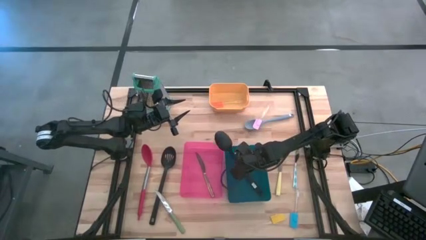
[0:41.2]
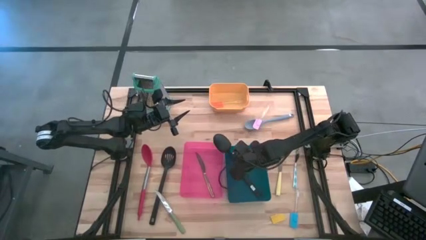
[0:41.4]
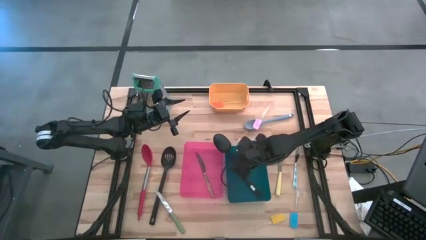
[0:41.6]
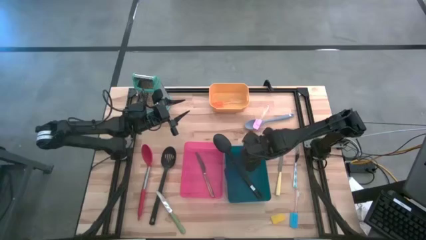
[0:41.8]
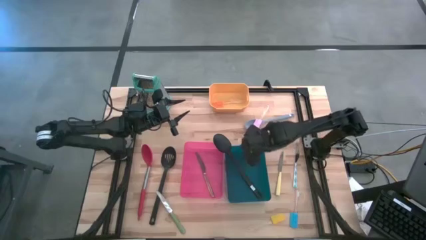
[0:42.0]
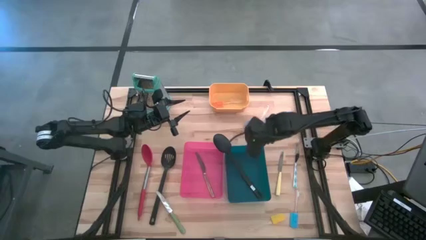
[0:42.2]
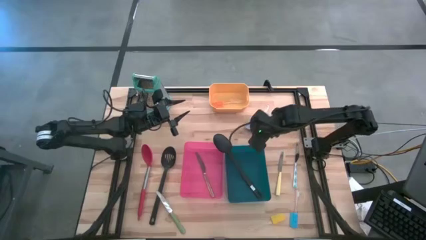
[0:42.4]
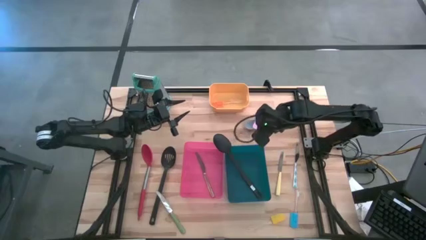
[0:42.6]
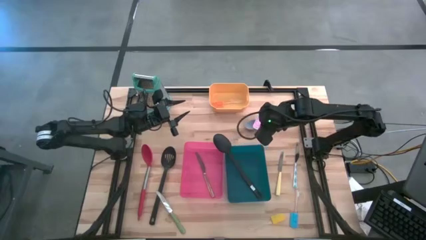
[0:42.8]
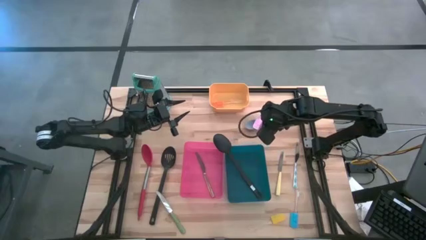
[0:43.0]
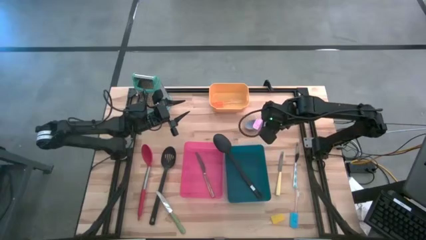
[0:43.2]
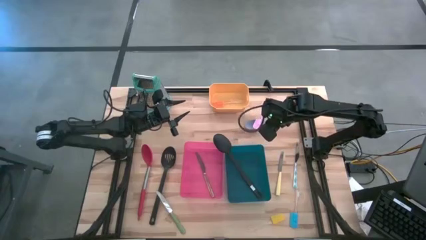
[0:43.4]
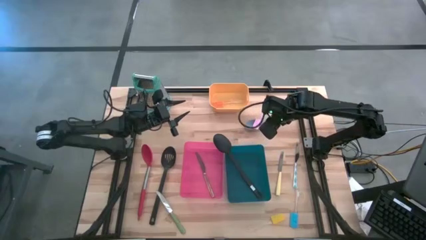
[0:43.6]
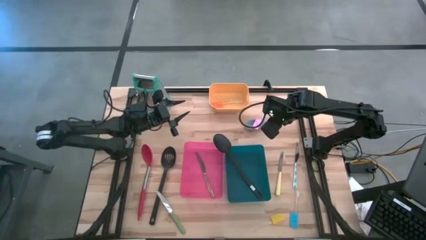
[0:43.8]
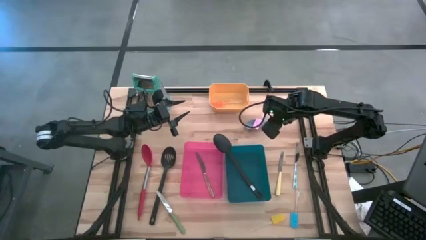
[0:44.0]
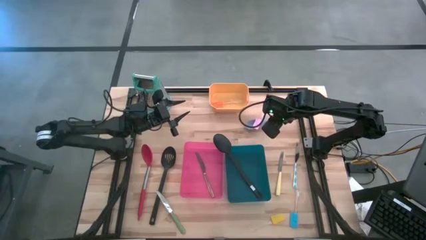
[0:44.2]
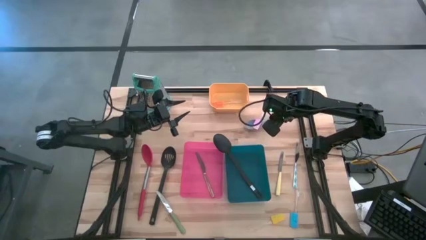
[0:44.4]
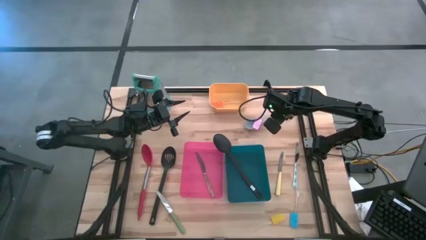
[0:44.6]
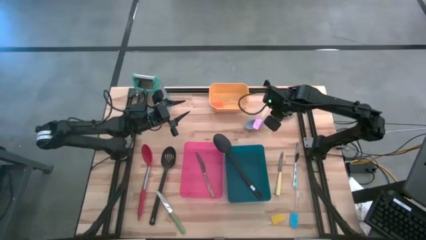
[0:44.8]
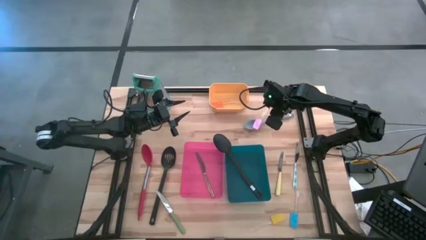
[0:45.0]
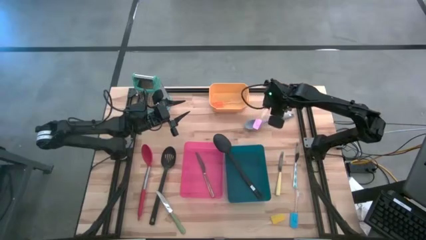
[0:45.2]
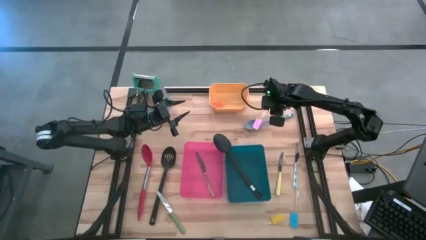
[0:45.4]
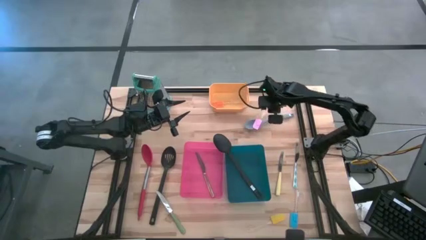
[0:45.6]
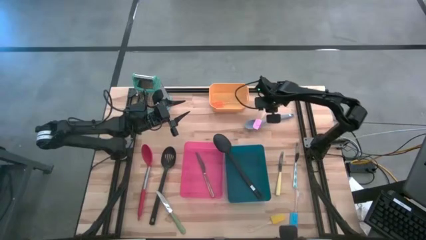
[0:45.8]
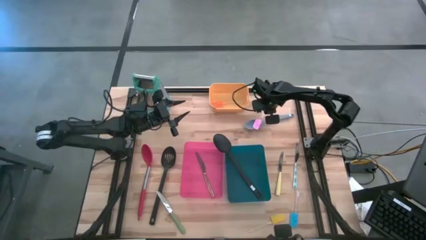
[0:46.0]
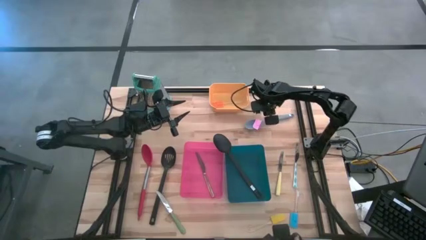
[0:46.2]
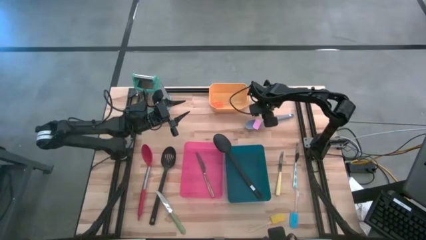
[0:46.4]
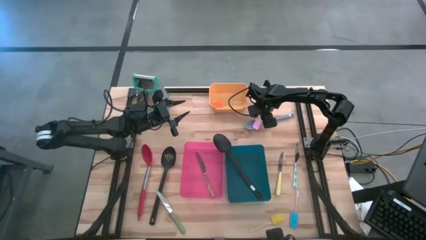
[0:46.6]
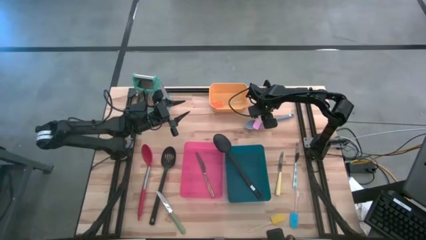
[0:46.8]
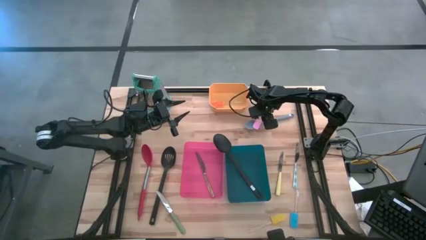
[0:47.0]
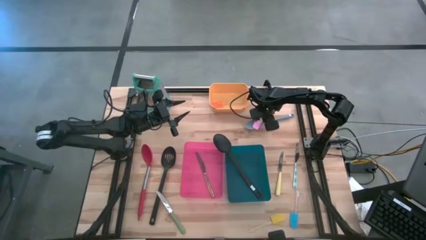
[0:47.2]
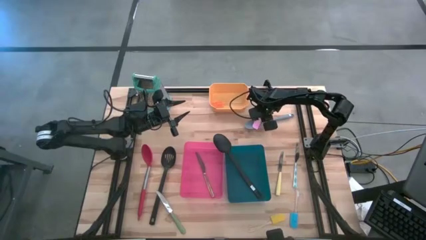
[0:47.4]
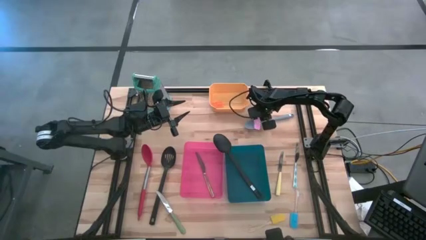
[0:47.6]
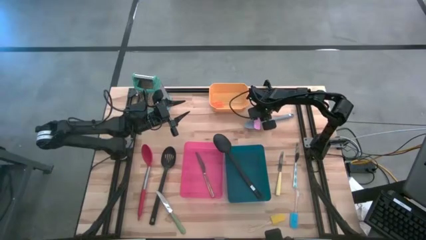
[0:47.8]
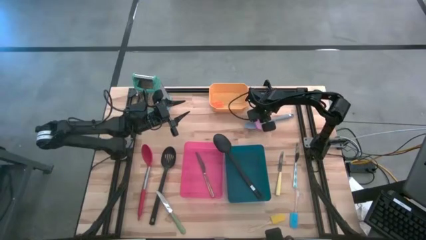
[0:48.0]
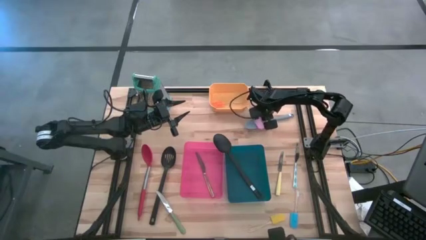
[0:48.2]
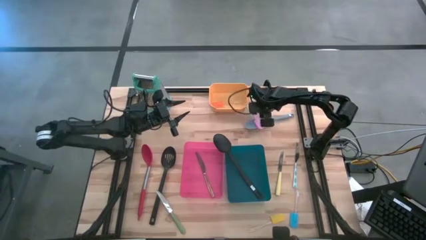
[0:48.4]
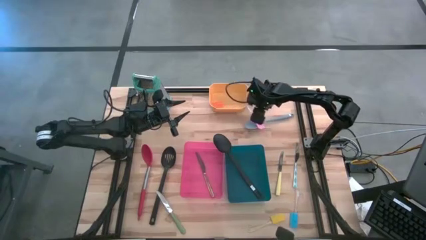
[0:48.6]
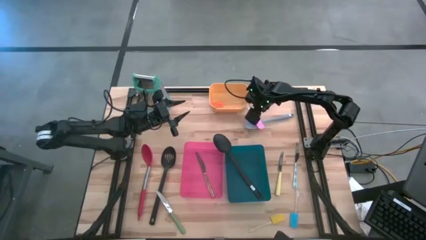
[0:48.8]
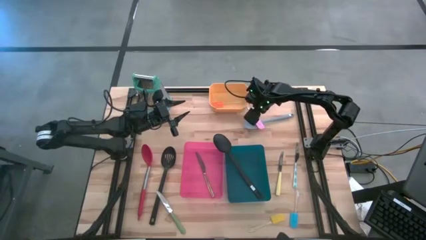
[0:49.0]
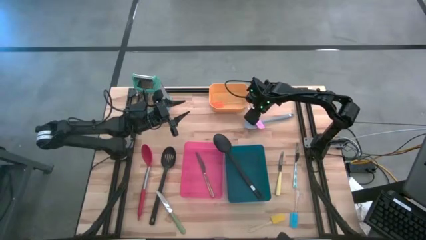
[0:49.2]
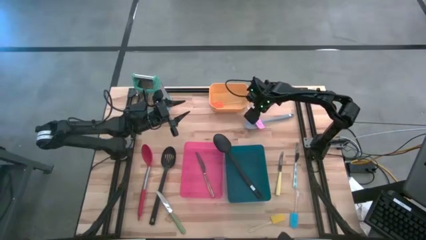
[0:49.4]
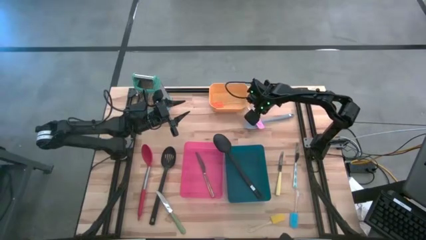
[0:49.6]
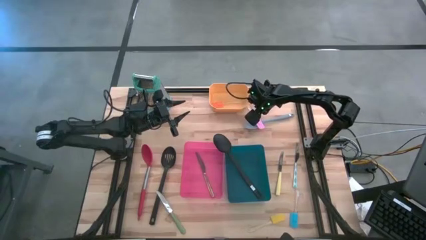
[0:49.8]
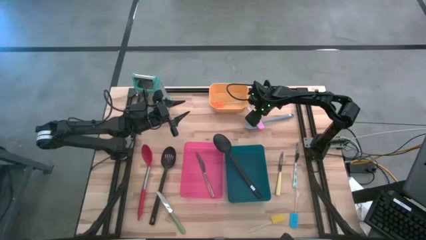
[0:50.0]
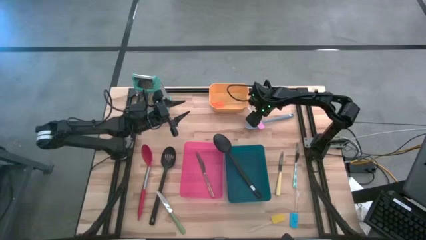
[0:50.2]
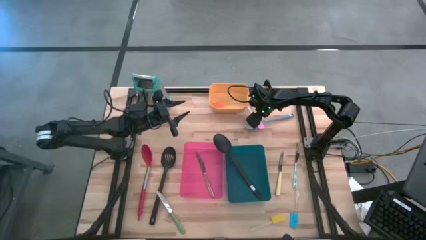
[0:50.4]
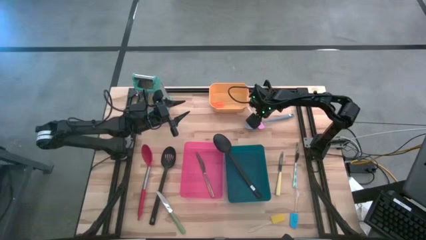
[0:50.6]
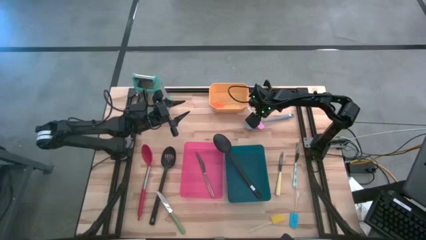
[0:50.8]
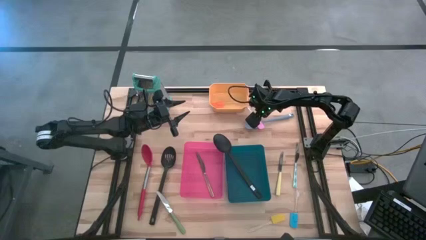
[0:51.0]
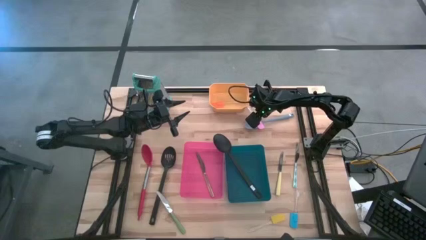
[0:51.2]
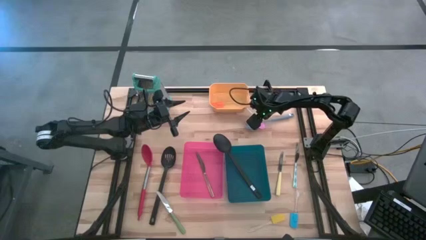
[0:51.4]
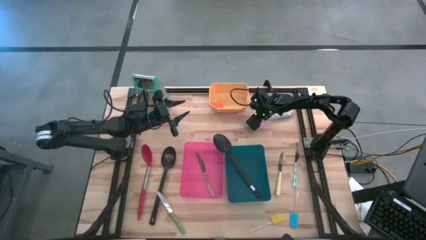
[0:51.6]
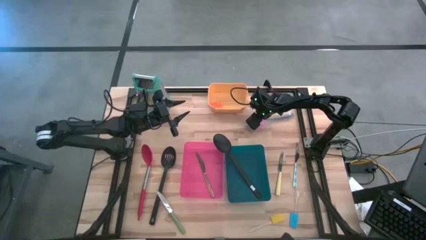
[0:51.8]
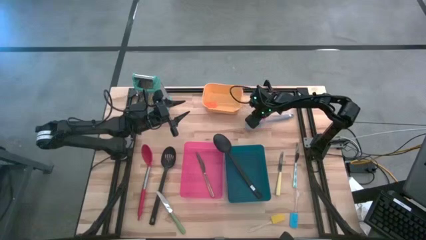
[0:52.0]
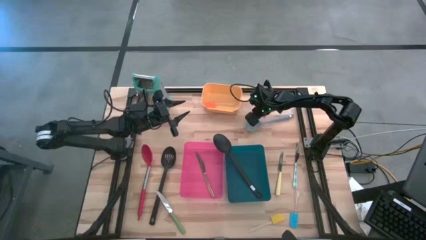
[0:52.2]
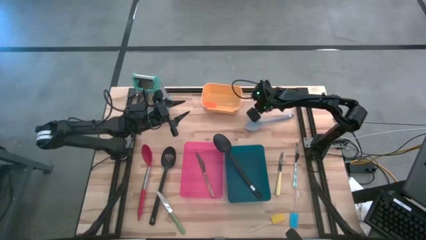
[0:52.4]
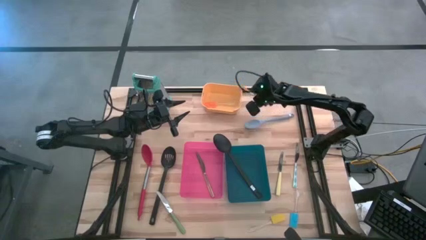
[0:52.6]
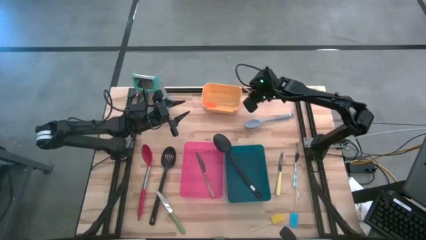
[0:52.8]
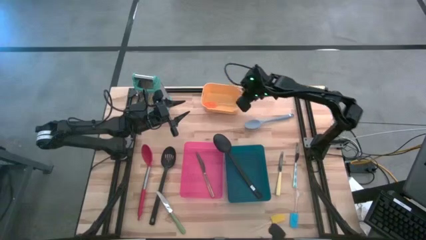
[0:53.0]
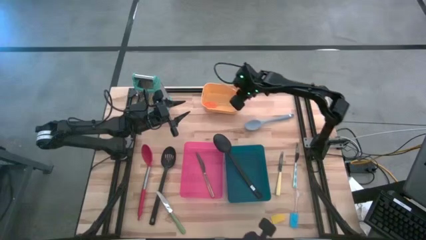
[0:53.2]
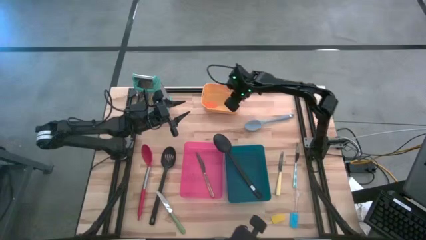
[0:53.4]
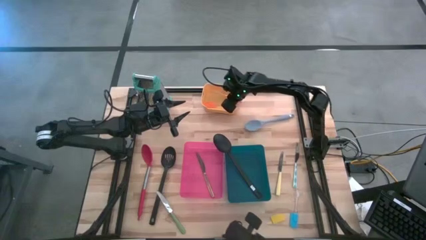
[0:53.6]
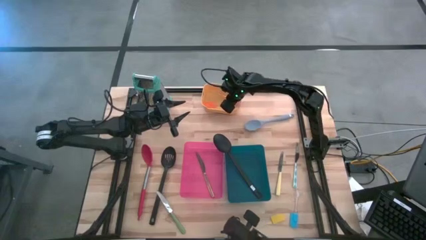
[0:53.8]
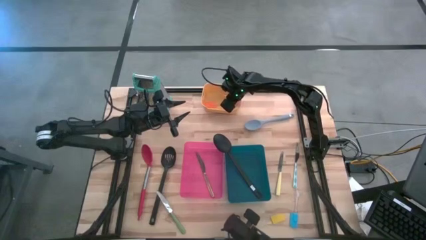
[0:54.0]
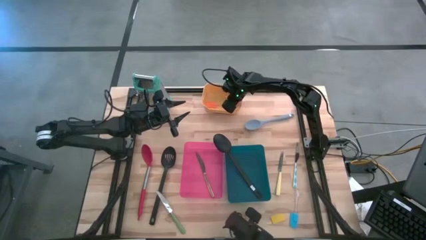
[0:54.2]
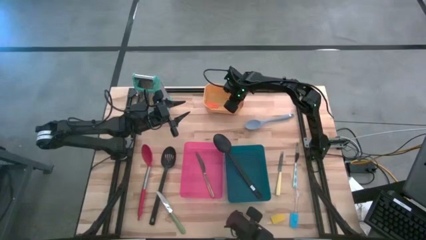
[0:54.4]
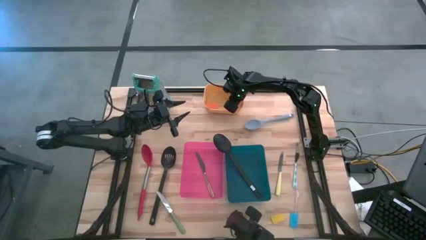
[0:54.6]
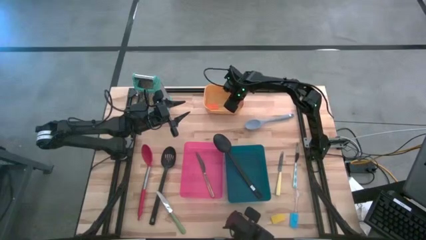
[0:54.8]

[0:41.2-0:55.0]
Task: Pick & Place Kitchen Items
Put the pink spatula into the yellow bin

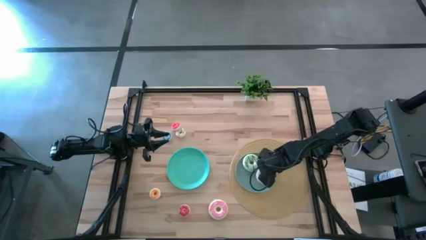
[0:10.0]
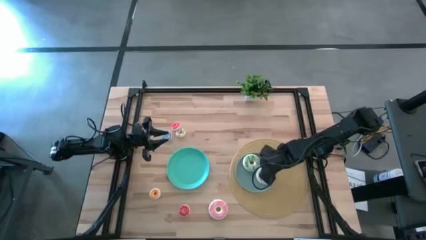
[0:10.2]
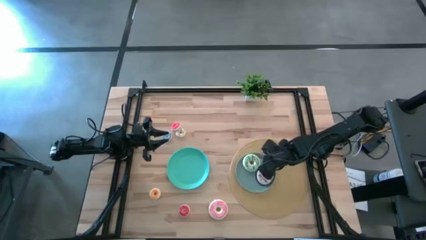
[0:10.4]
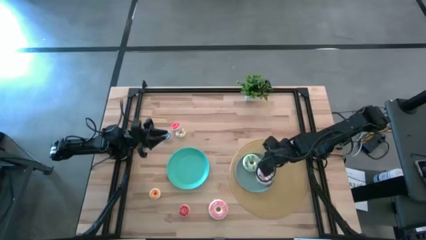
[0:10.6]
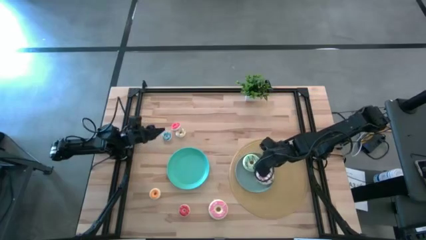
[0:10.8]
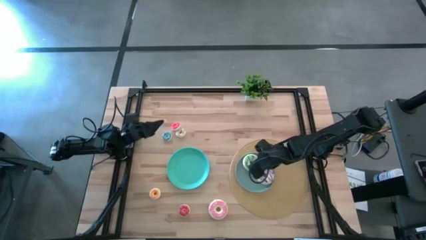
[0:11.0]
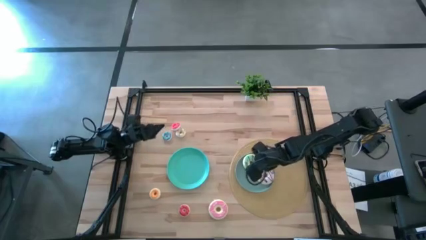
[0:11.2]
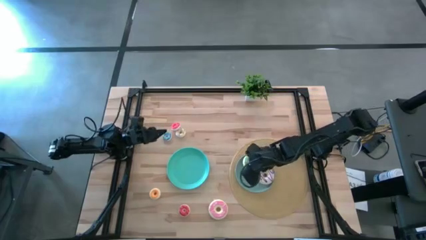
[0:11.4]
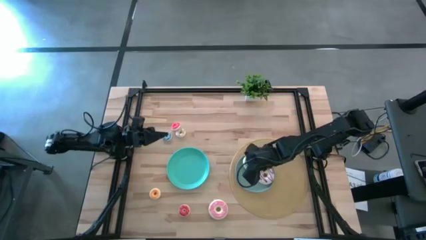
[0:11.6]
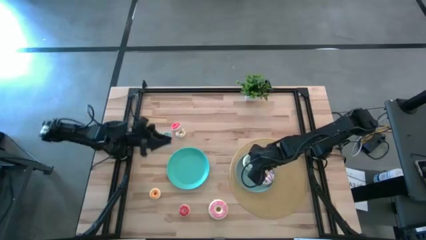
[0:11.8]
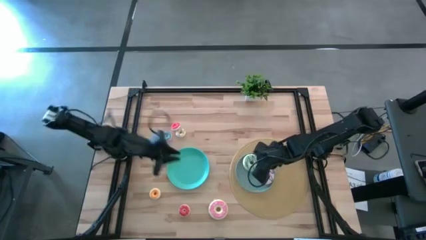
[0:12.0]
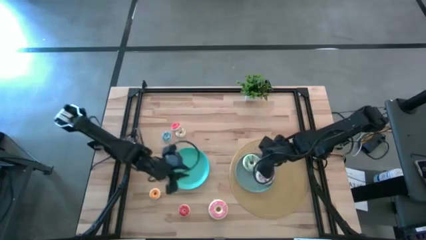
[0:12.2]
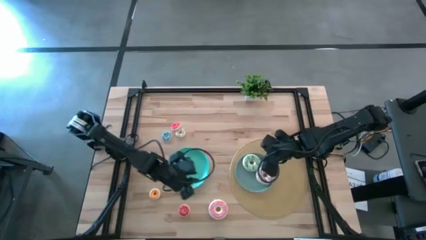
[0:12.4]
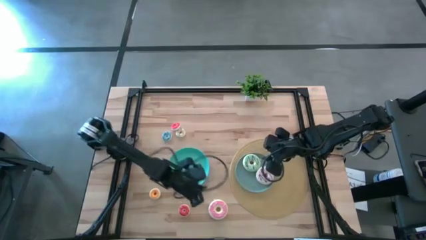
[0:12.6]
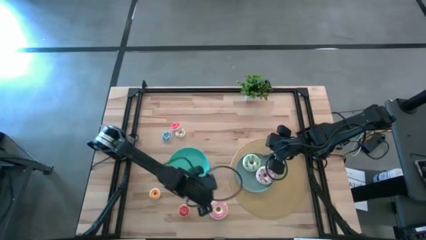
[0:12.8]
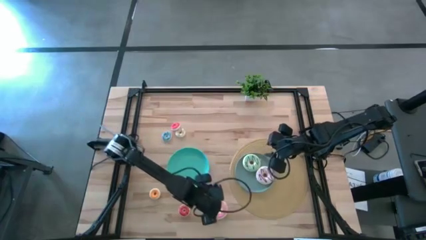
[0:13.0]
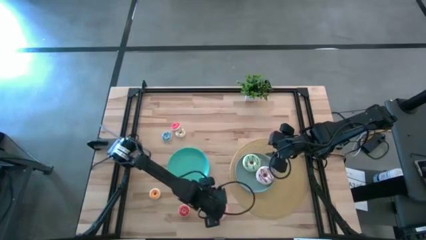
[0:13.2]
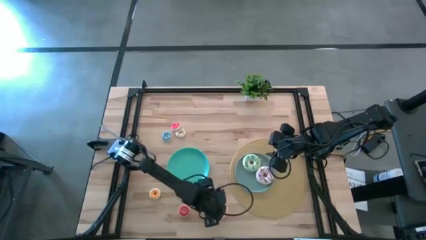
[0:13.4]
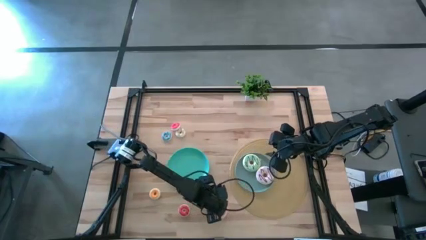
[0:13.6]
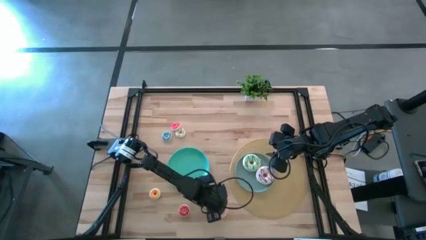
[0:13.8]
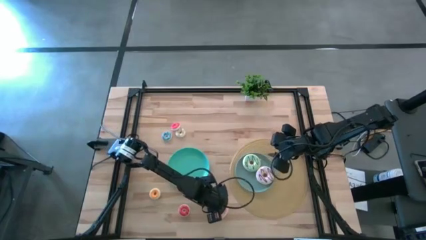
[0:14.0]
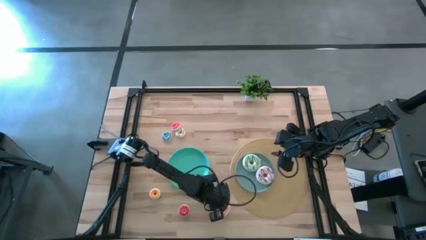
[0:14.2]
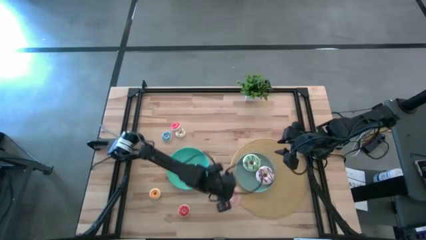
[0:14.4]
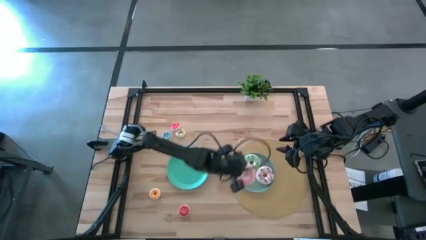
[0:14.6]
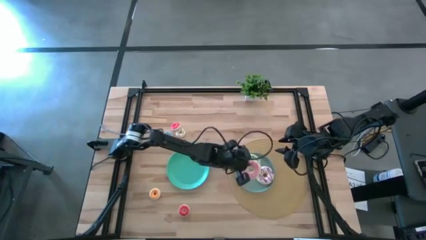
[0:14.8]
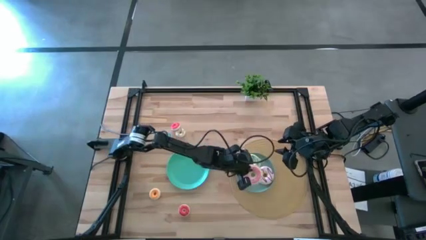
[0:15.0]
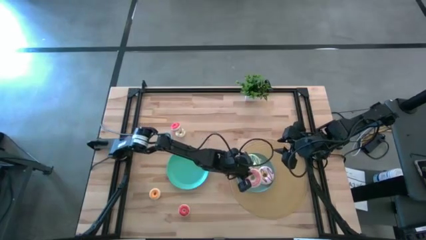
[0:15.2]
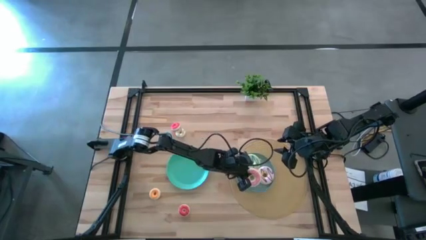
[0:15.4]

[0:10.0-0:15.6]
Task: Pick & Place donuts
Put the big pink donut on the blue plate
